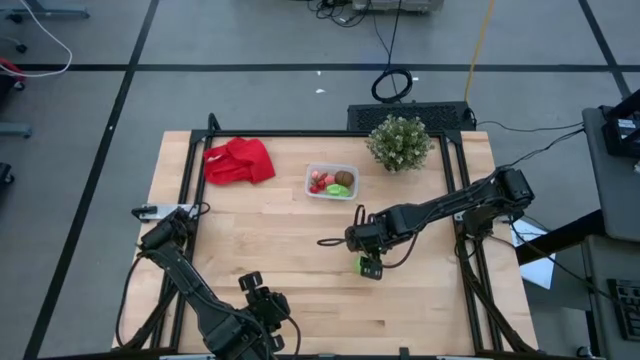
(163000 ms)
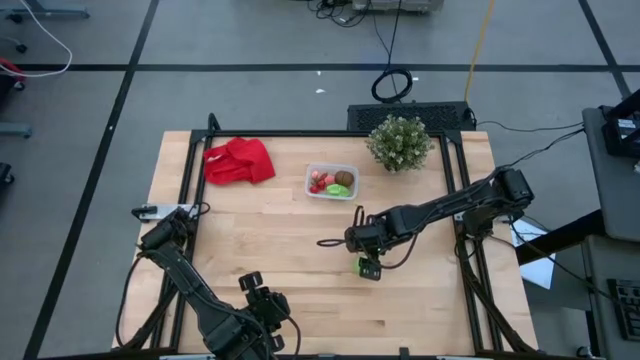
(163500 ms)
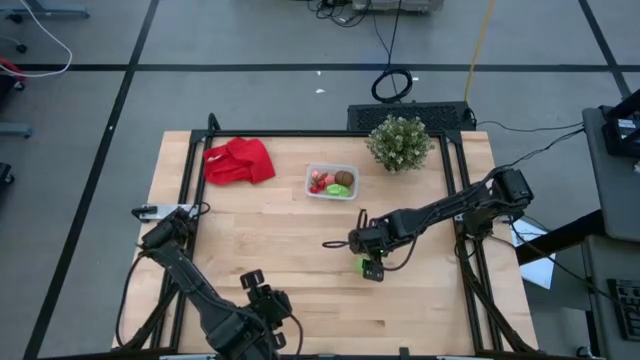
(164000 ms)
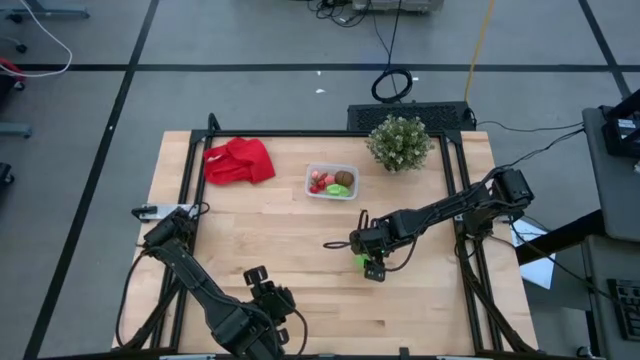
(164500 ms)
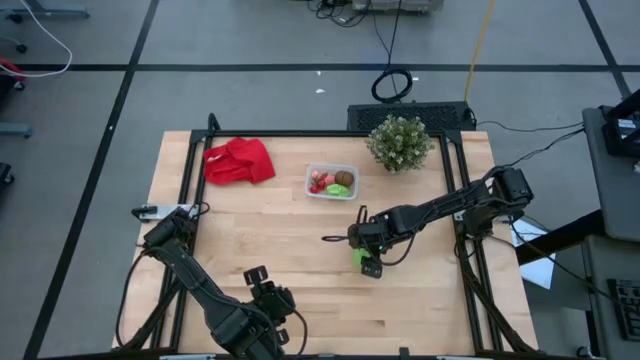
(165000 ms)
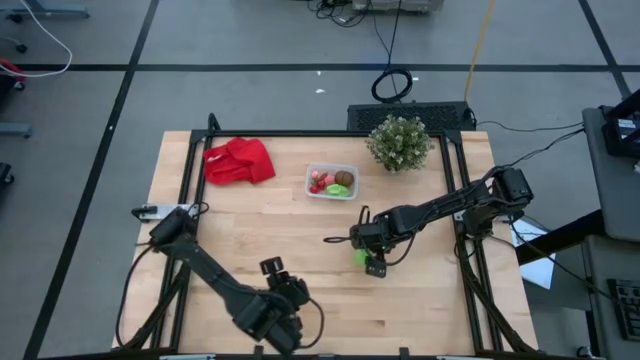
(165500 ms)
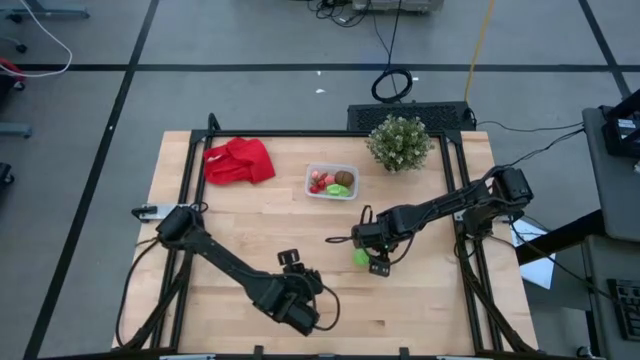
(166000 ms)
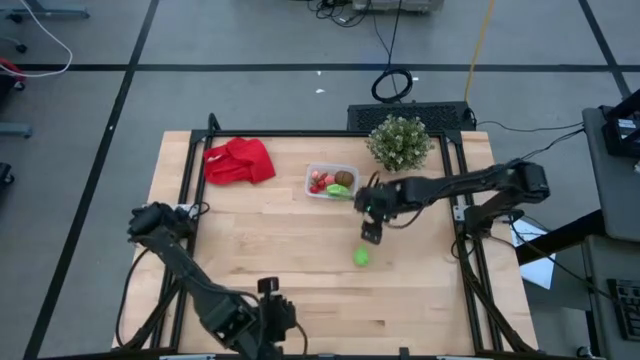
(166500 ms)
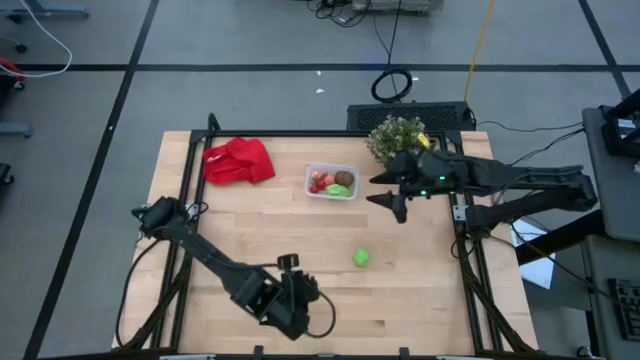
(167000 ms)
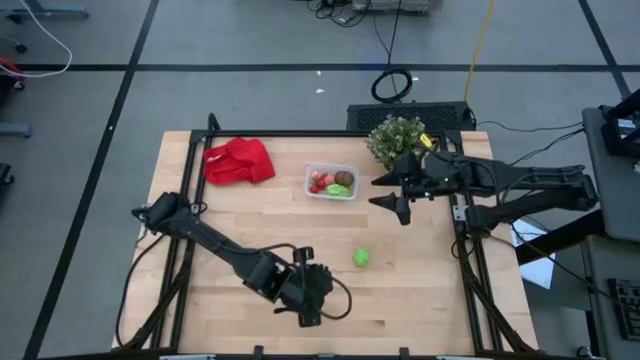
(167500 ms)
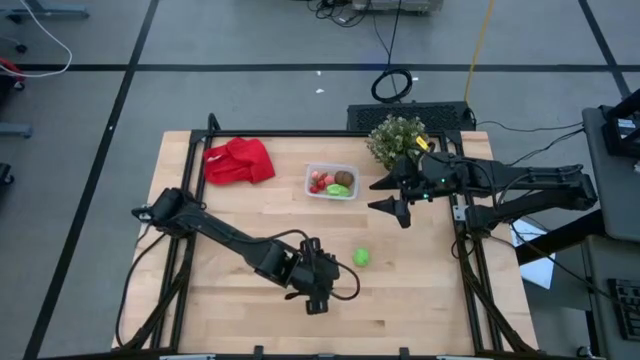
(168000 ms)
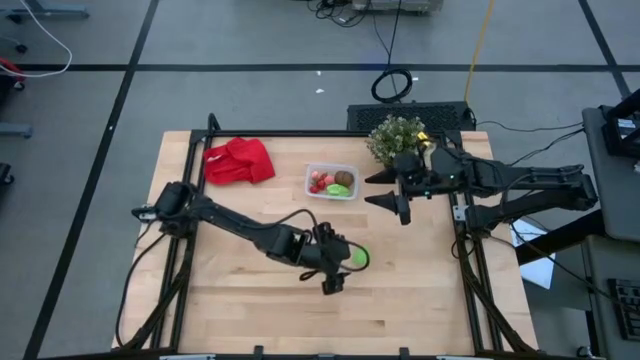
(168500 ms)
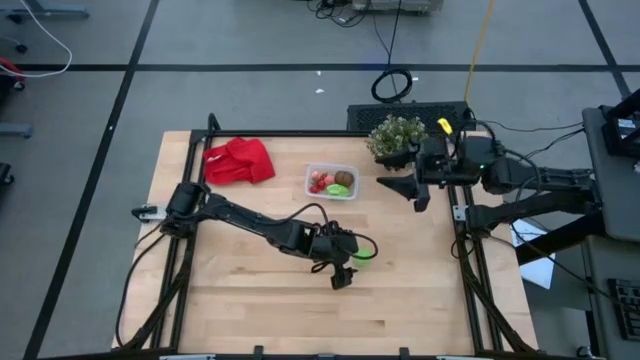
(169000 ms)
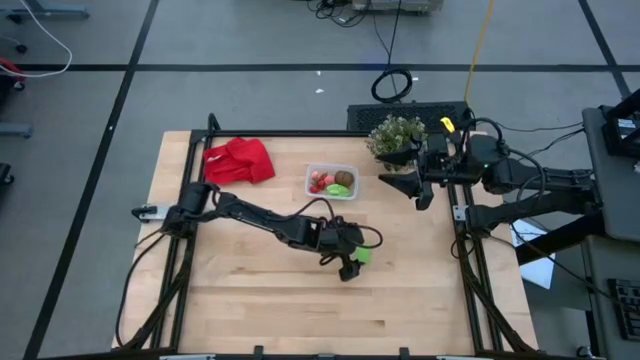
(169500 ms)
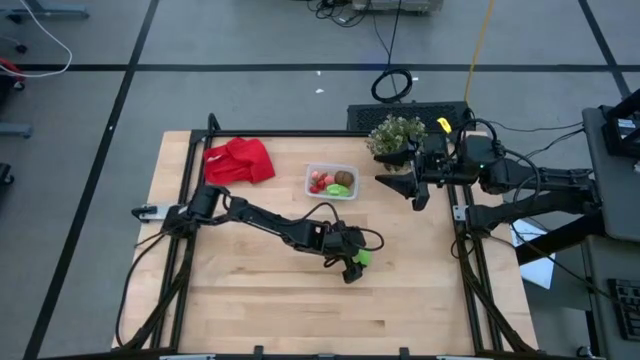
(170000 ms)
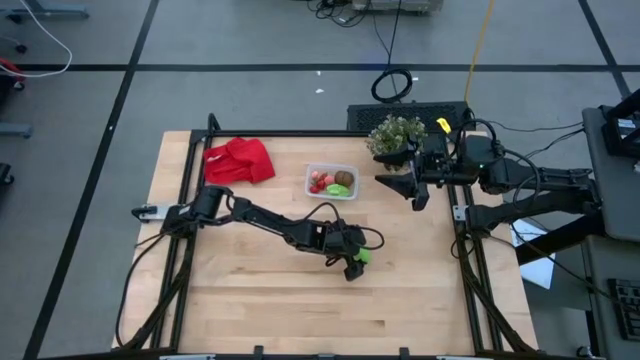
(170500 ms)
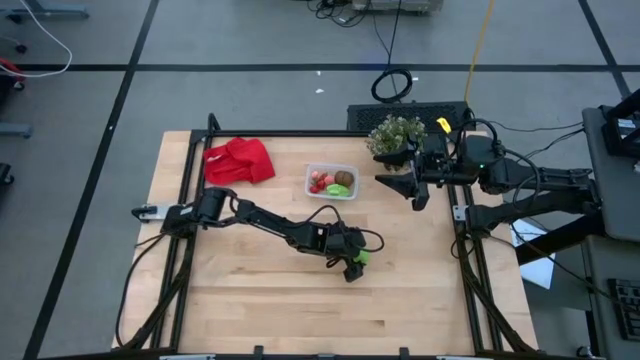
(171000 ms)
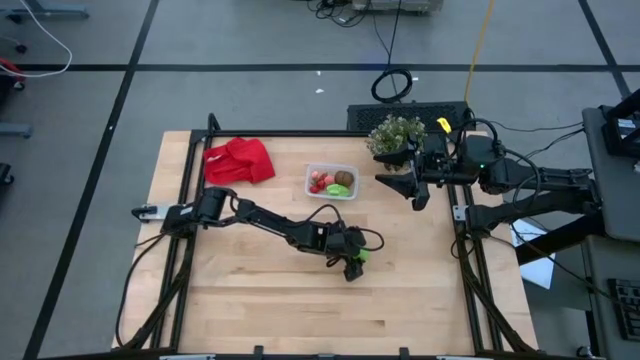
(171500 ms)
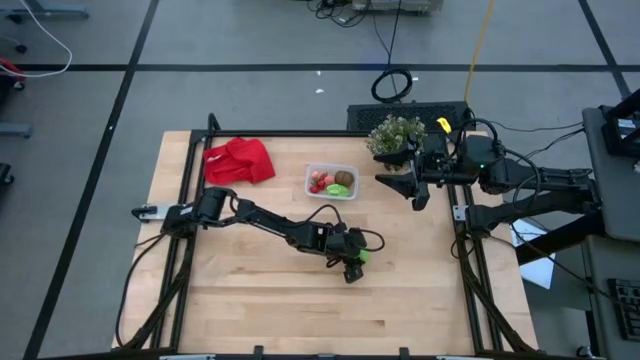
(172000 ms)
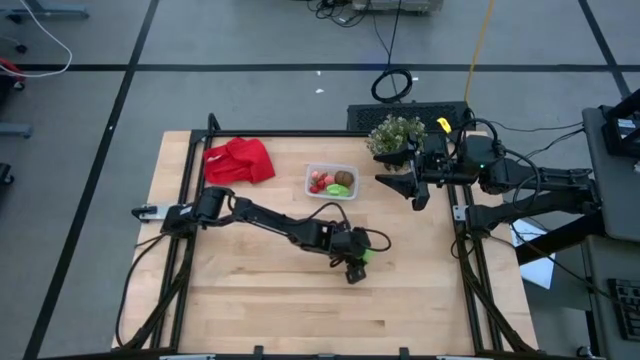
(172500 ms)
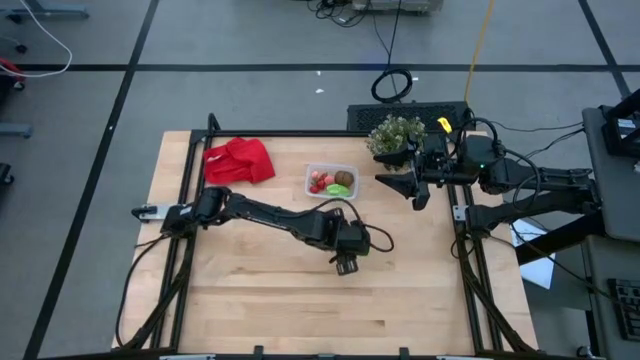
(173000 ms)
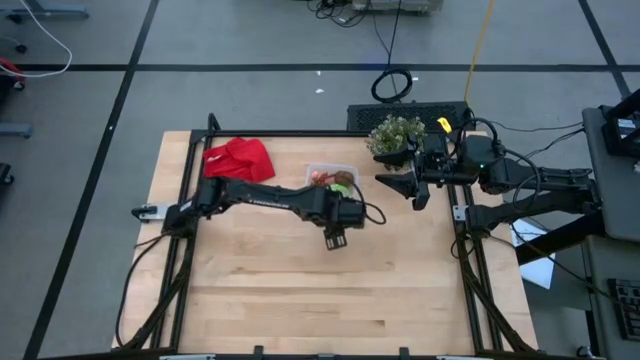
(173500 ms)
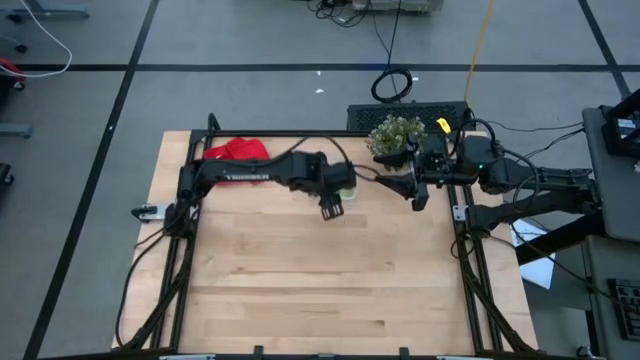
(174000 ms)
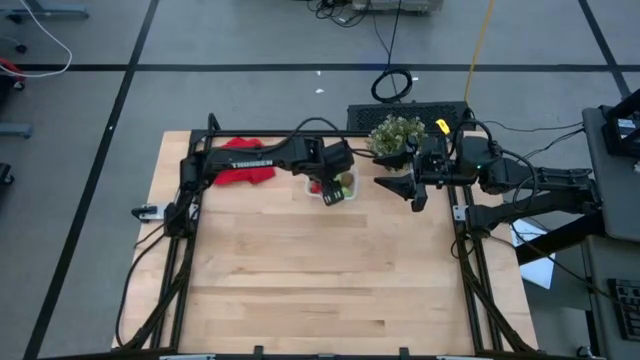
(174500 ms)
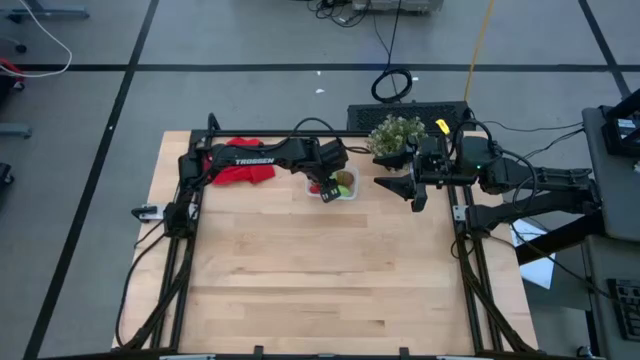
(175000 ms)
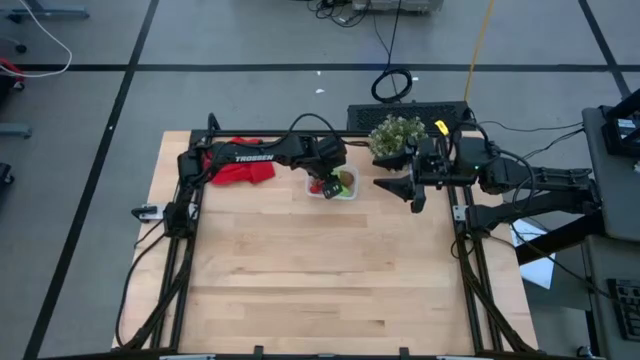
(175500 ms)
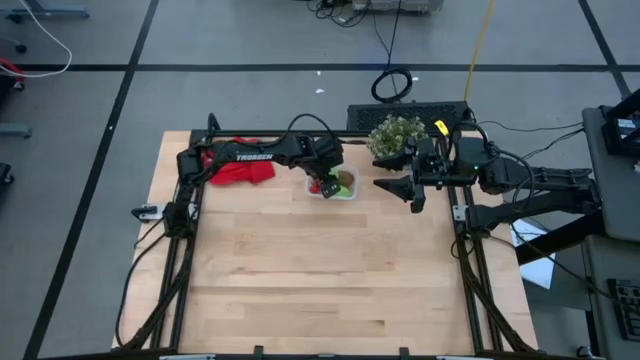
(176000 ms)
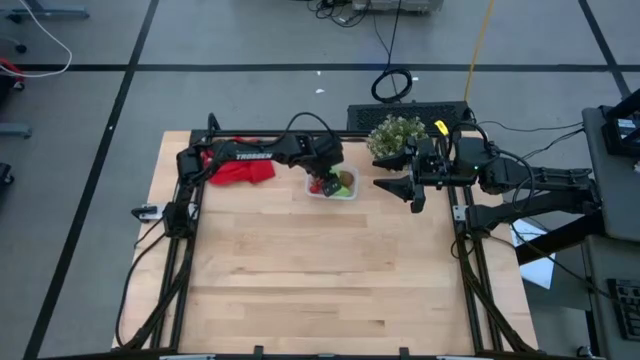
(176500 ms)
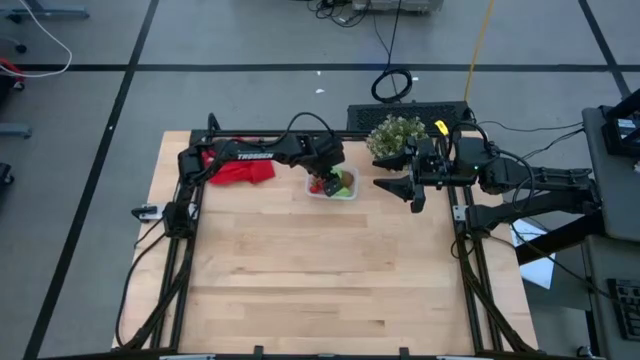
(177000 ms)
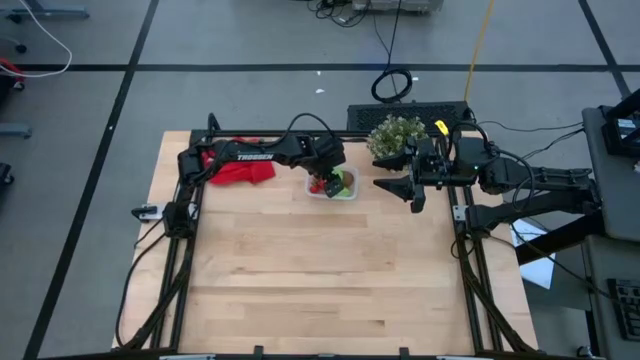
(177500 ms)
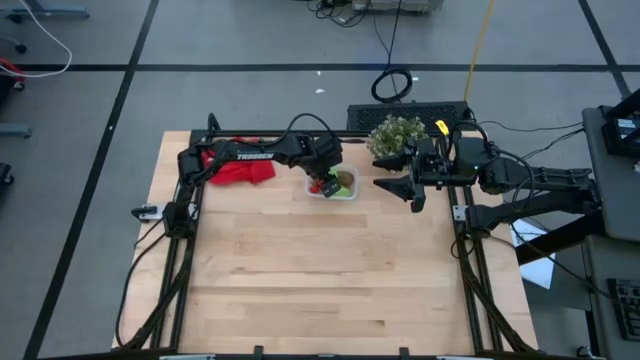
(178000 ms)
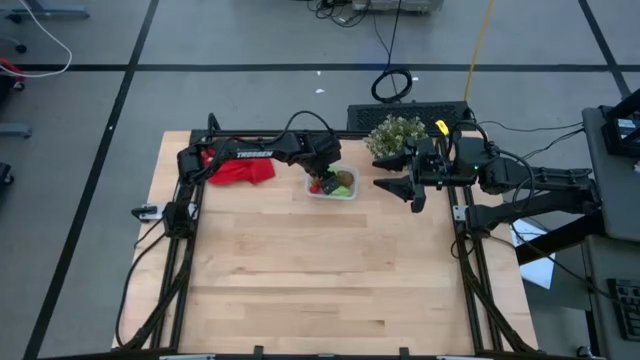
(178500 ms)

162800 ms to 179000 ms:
Task: Pick and placing Produce into tupperware
Put the cabbage into the bin

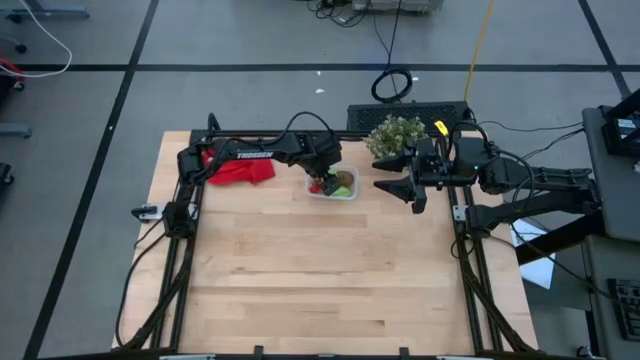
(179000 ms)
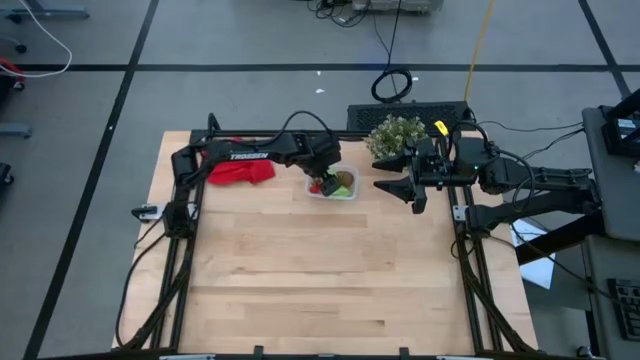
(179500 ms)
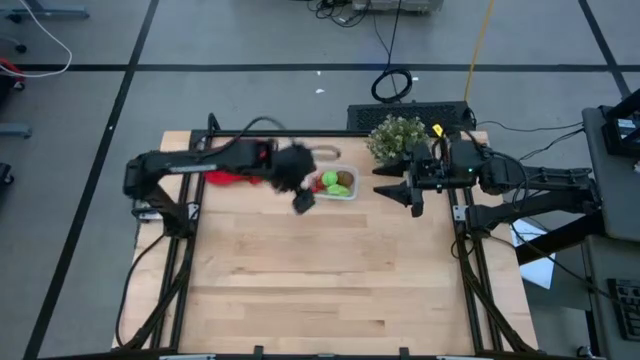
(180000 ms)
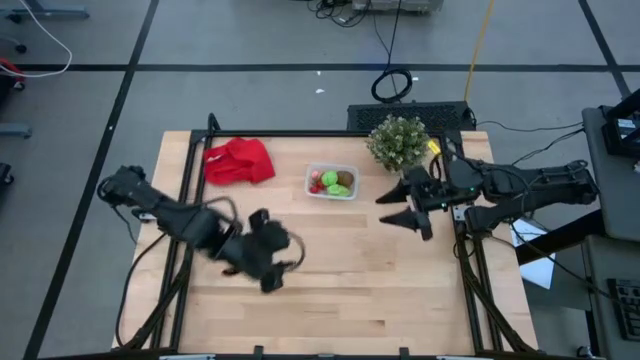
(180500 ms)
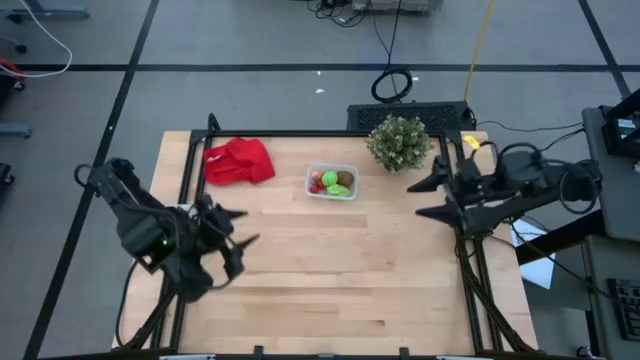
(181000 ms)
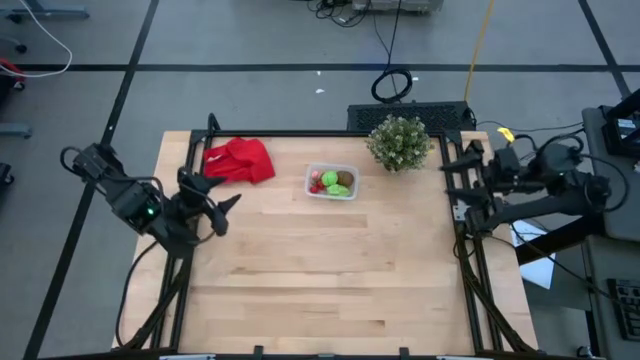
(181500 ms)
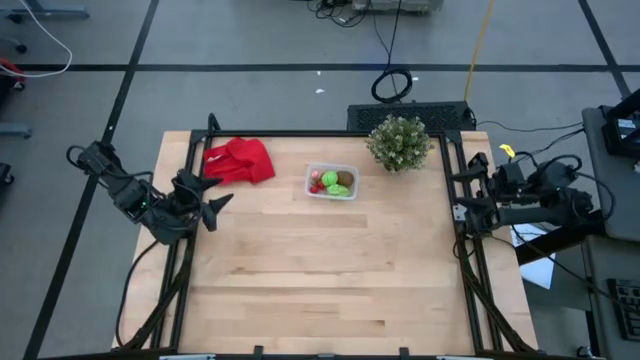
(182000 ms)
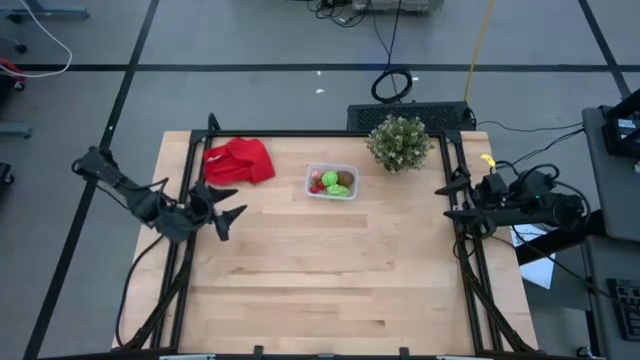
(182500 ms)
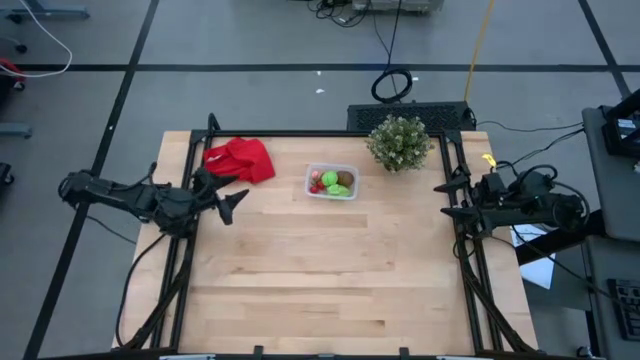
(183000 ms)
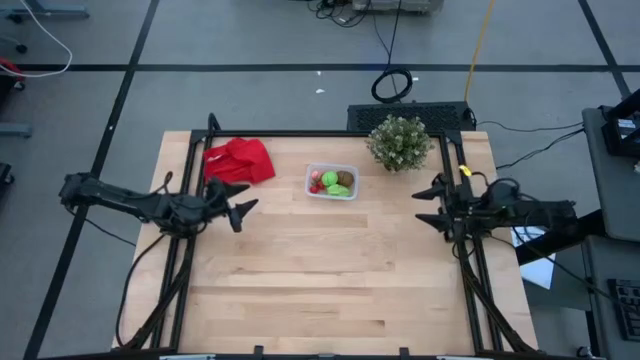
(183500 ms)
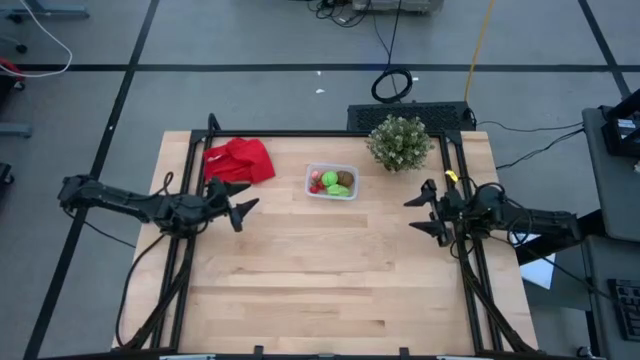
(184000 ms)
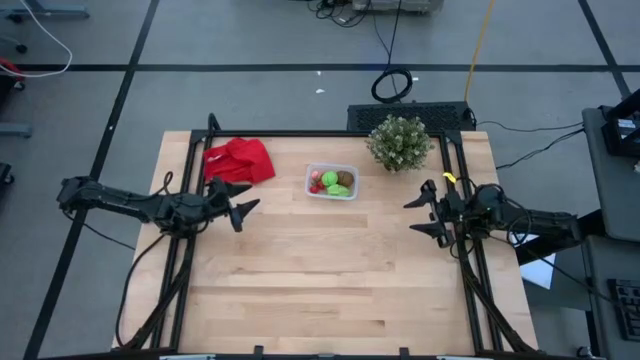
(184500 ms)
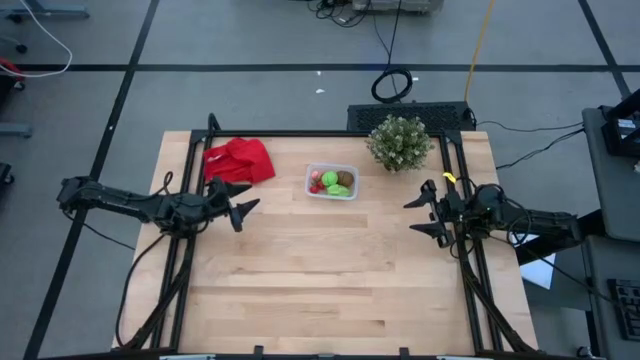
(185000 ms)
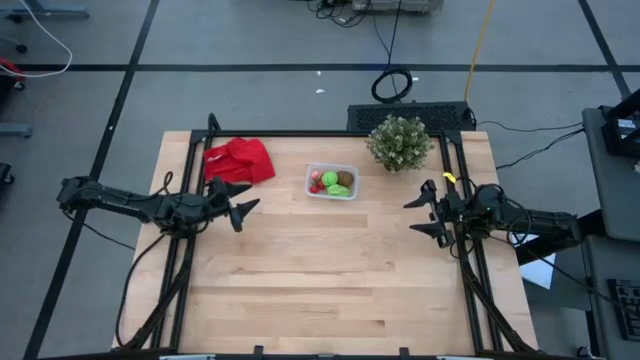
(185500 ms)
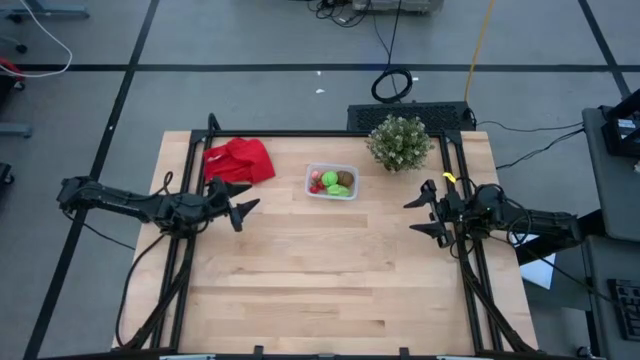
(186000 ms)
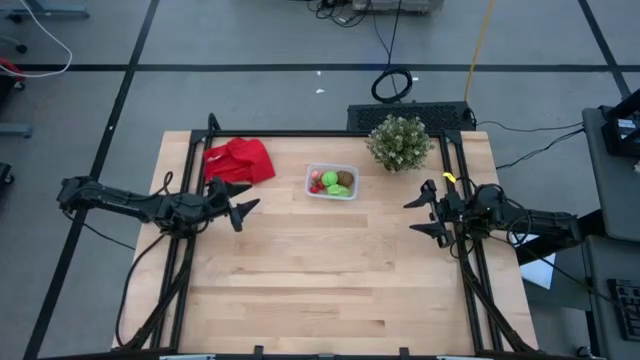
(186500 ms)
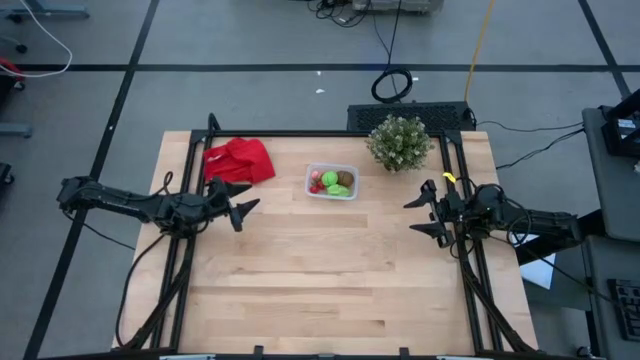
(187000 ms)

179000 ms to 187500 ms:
Return to Home Position
